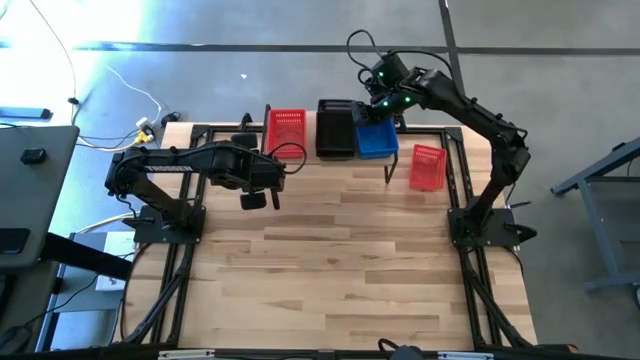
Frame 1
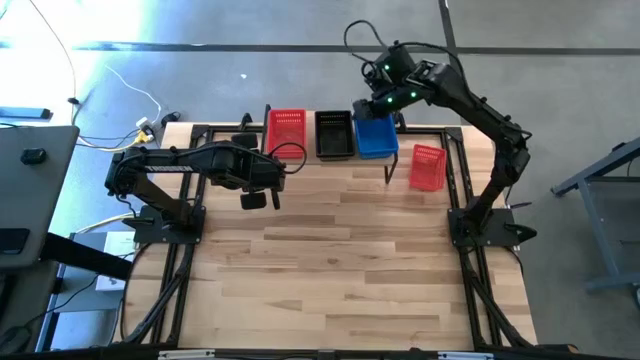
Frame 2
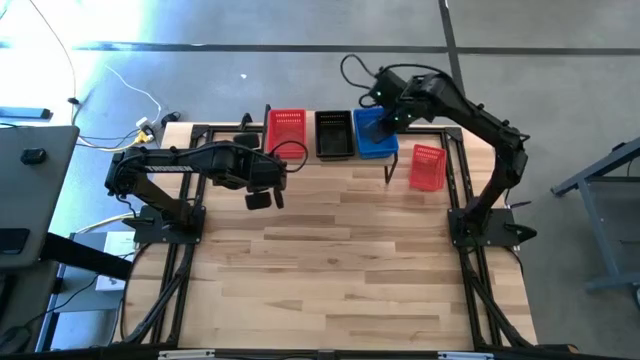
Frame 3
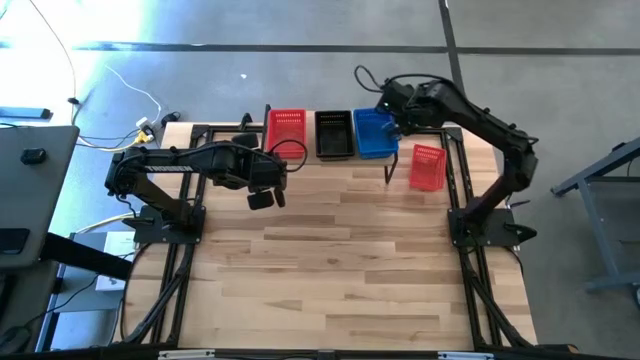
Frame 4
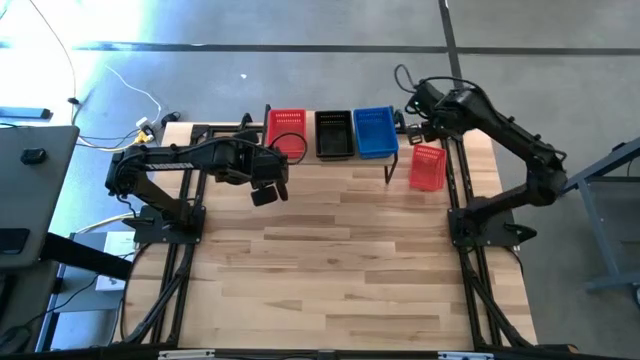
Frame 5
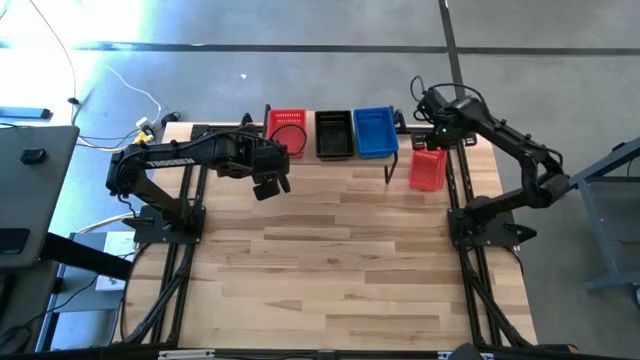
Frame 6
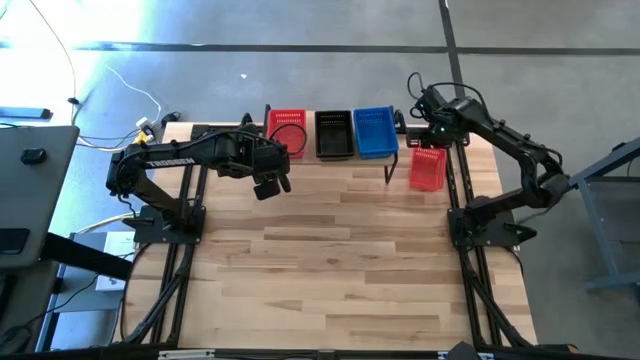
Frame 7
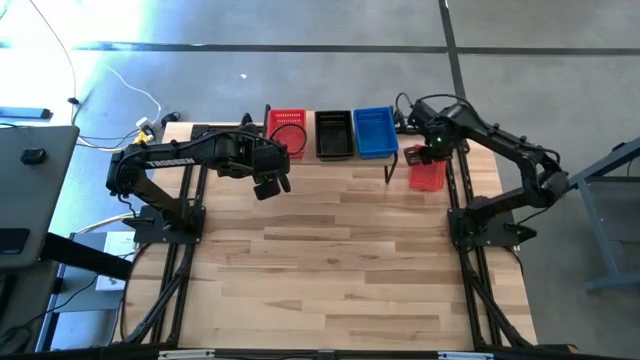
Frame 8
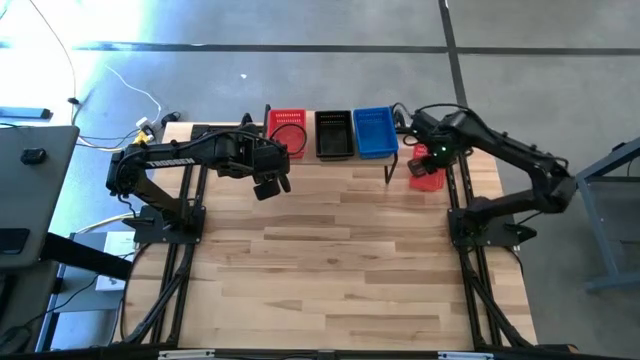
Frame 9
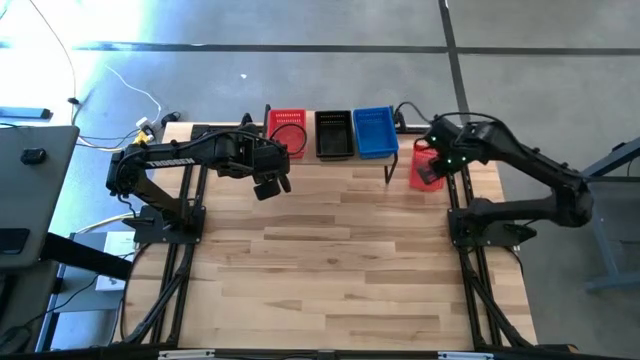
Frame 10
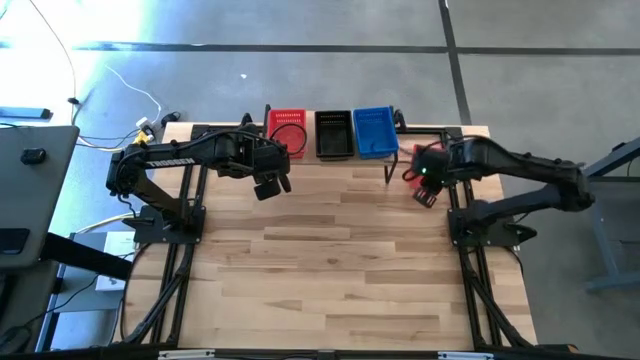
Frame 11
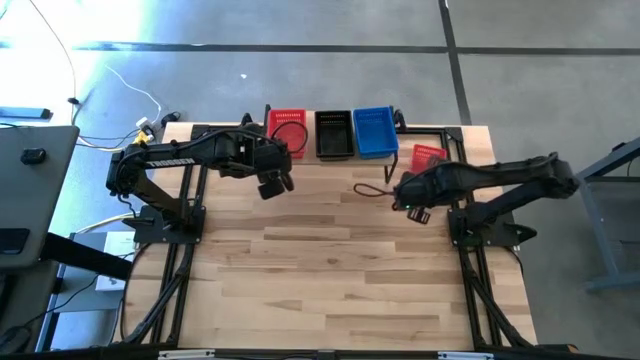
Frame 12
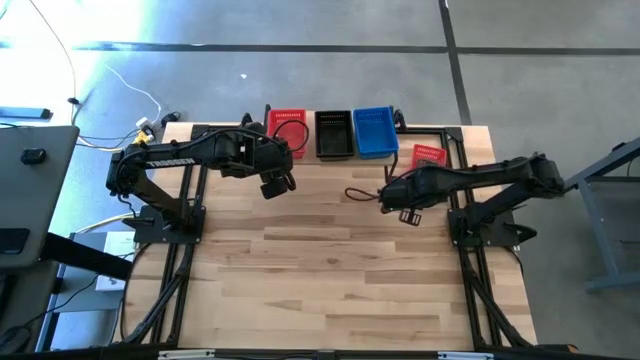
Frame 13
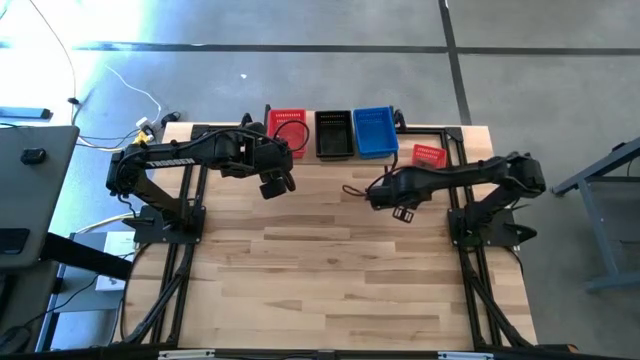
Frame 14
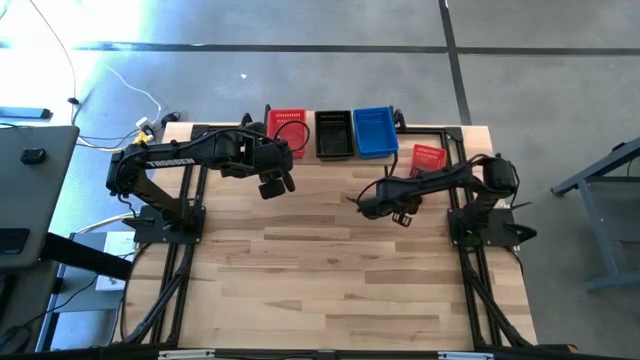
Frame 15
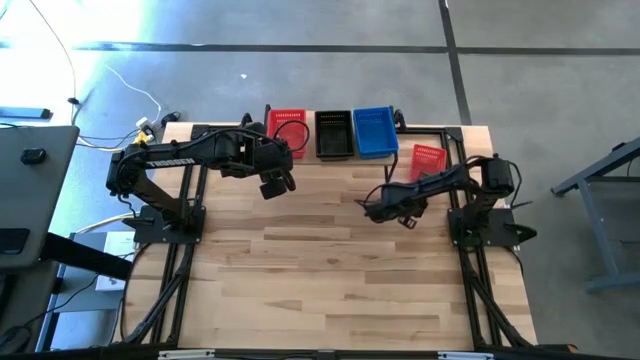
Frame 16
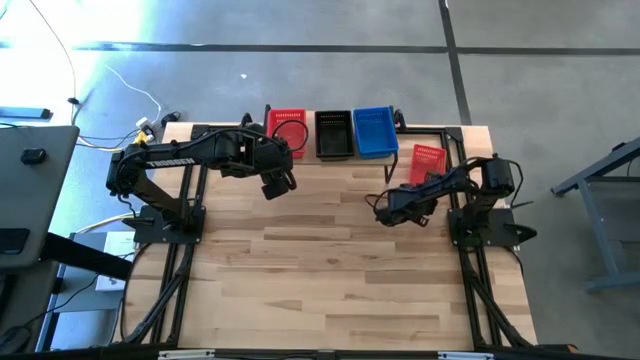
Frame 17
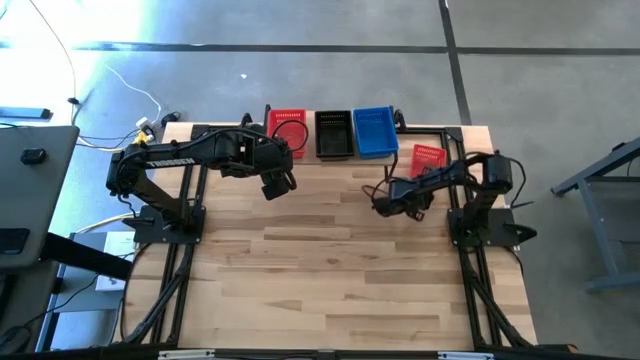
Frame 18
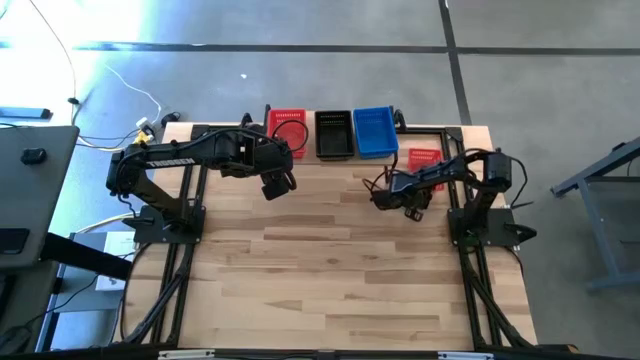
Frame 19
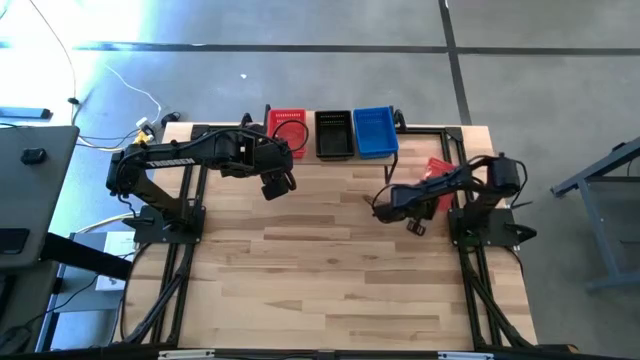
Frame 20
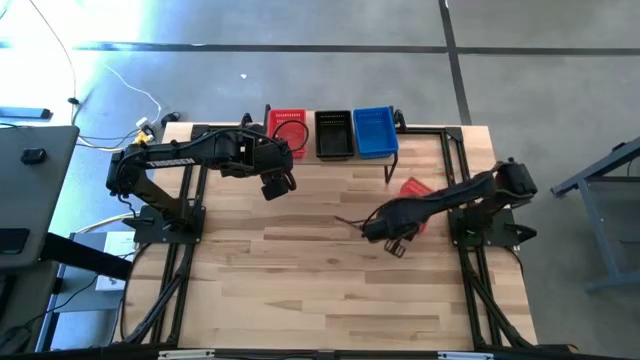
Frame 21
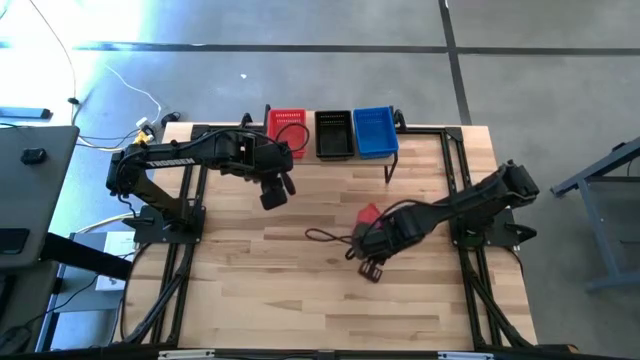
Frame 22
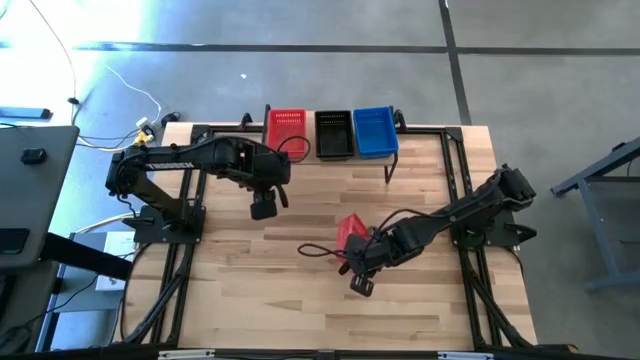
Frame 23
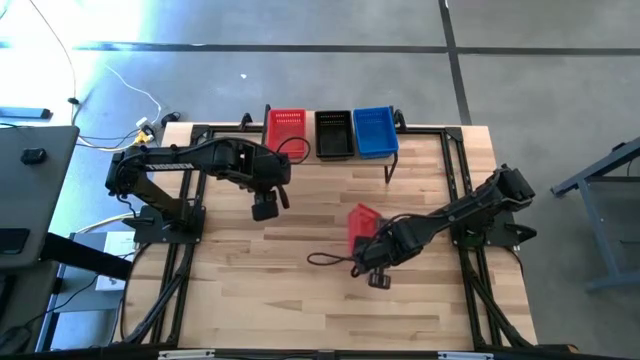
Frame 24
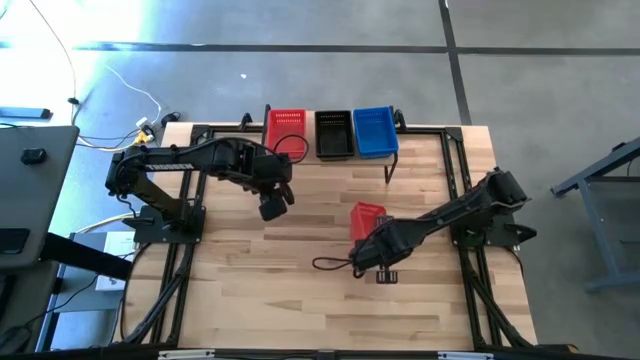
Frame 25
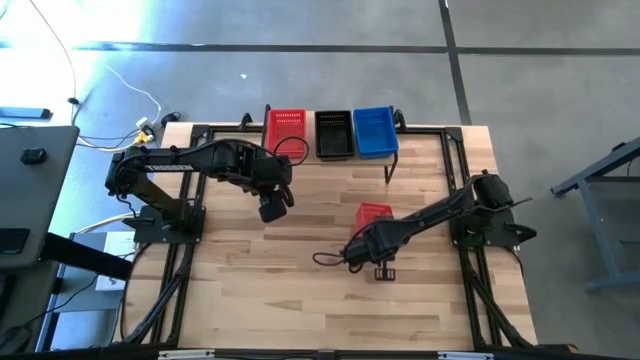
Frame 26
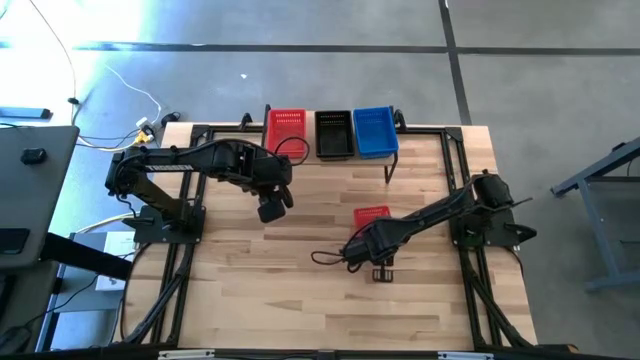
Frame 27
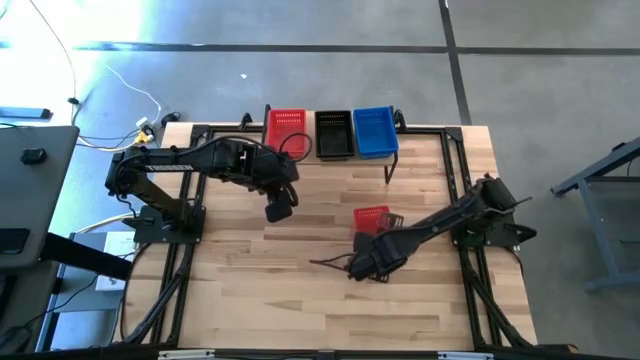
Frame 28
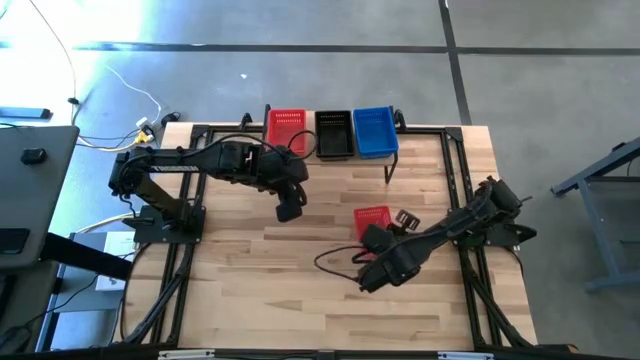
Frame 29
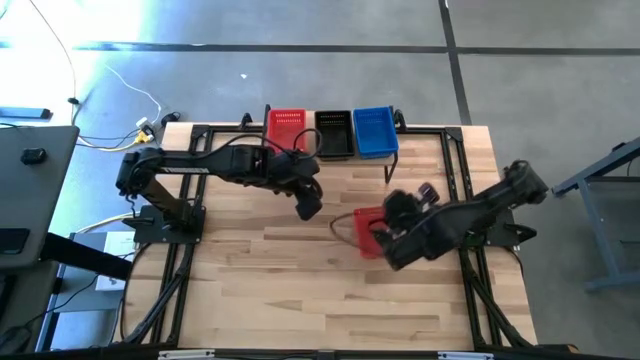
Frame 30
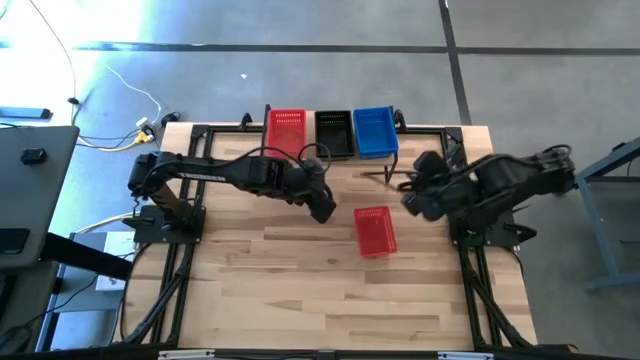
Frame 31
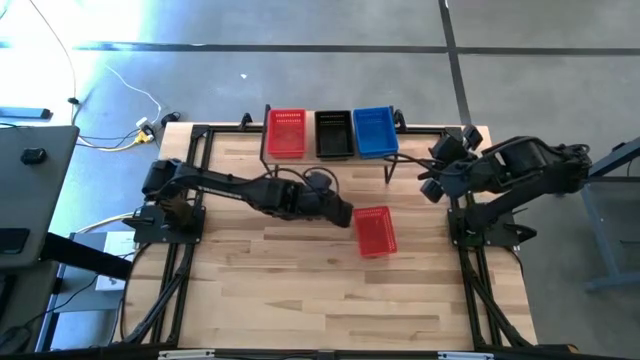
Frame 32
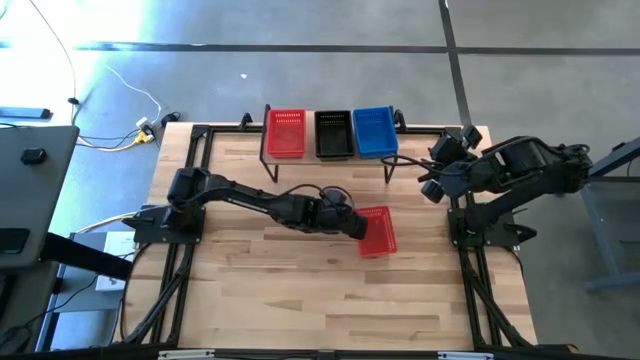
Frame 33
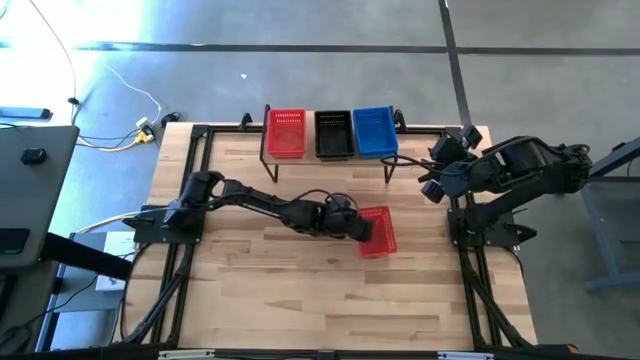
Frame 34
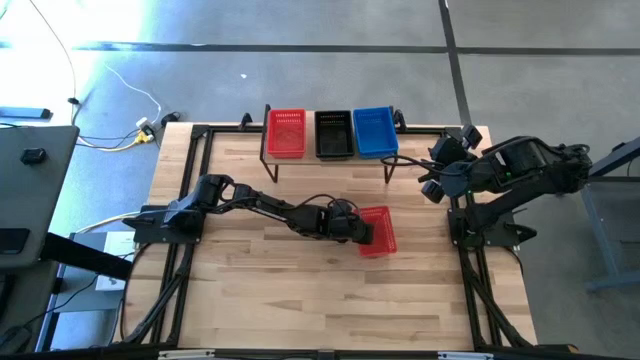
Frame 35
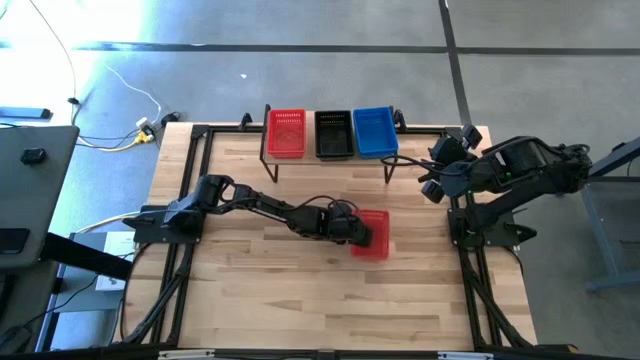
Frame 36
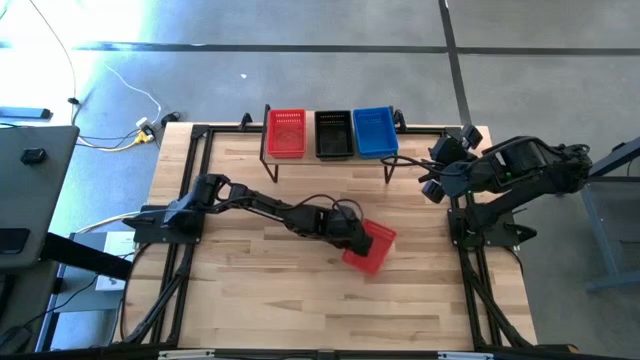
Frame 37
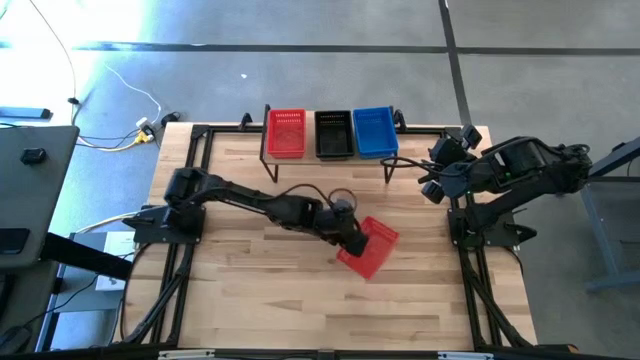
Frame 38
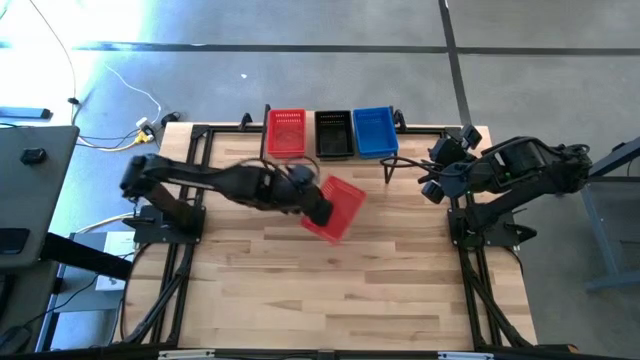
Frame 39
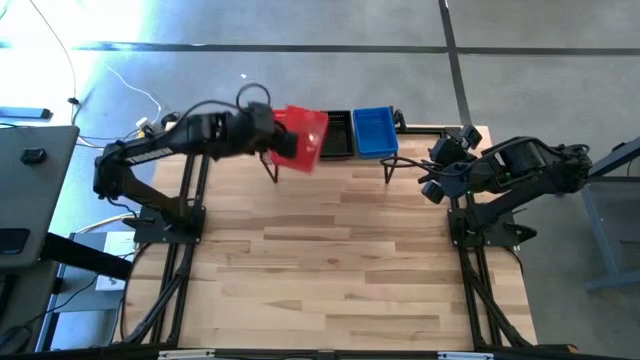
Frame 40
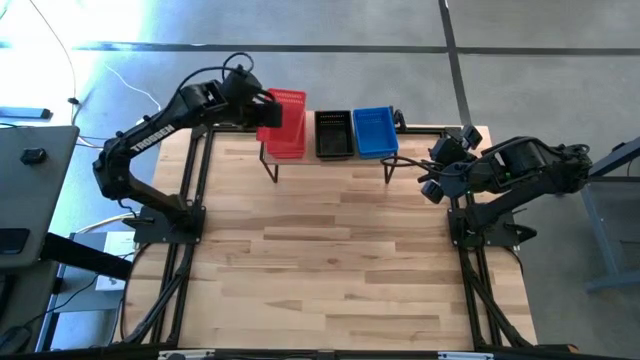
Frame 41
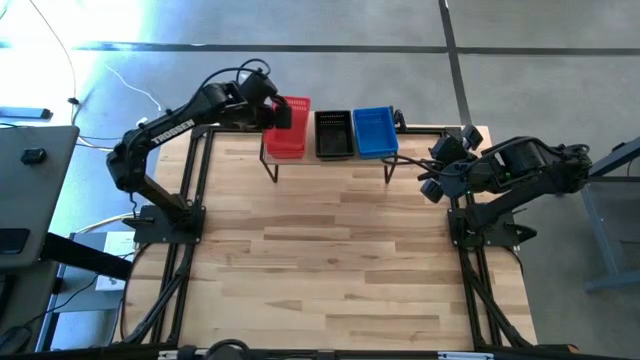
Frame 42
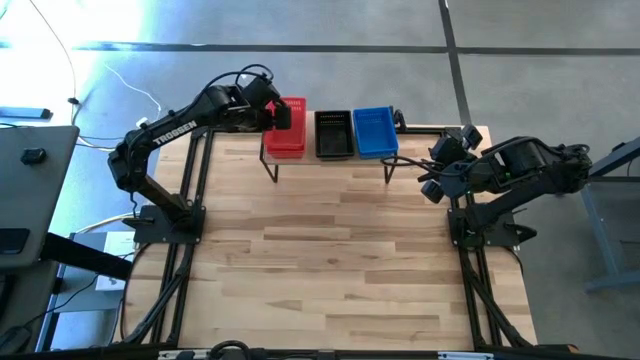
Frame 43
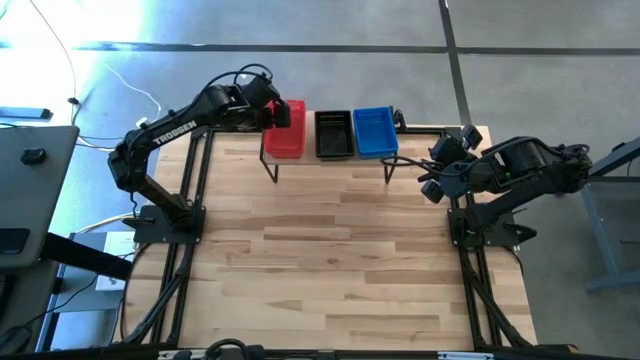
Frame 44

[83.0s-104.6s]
Task: Stack baskets on shelf by color
Stack the red bin on top of the stacked red bins on the shelf
